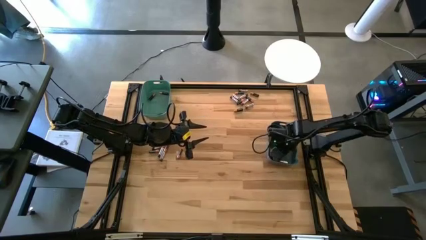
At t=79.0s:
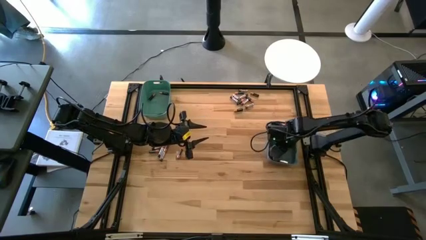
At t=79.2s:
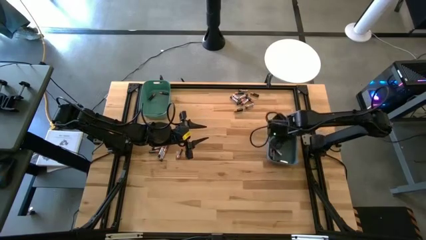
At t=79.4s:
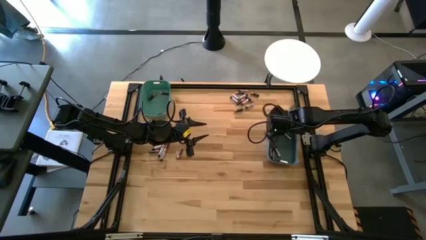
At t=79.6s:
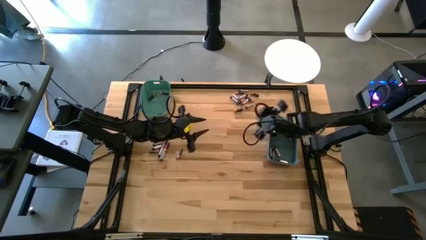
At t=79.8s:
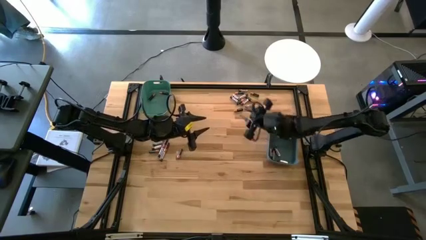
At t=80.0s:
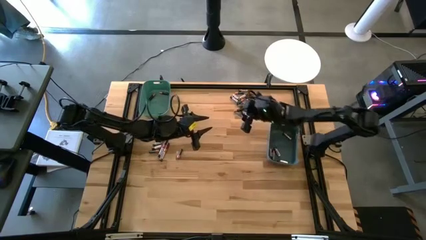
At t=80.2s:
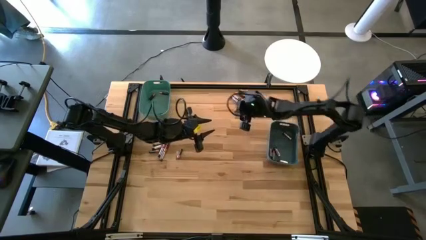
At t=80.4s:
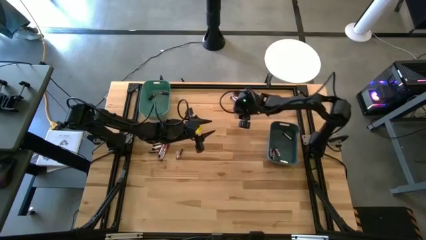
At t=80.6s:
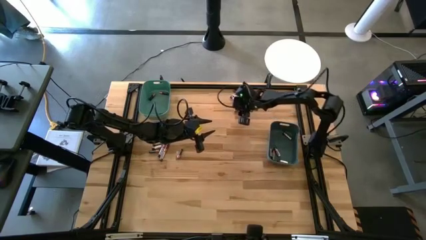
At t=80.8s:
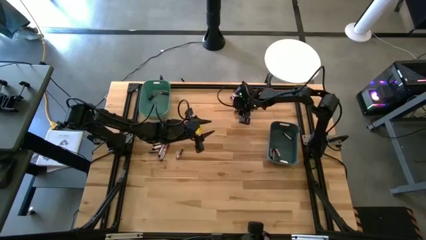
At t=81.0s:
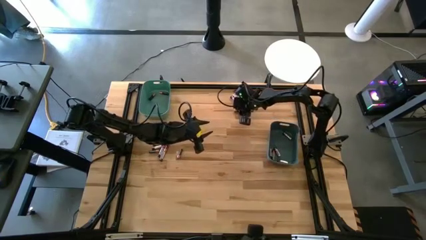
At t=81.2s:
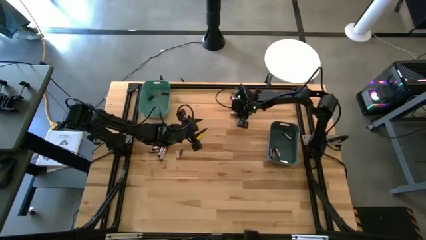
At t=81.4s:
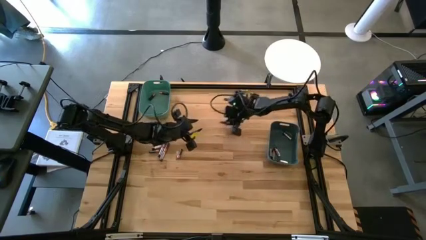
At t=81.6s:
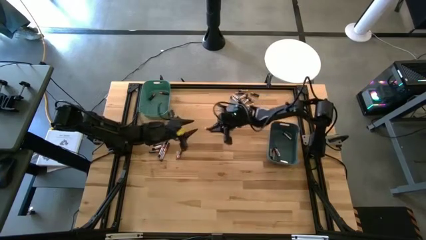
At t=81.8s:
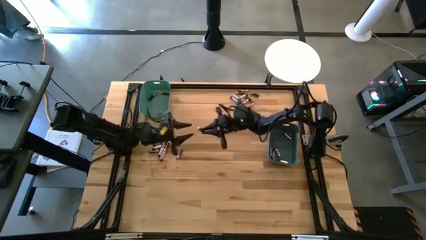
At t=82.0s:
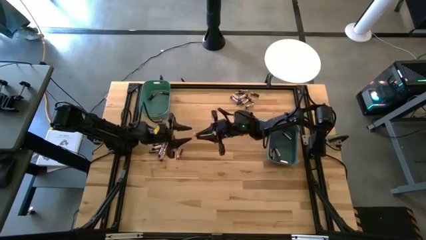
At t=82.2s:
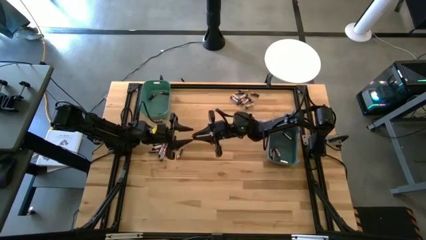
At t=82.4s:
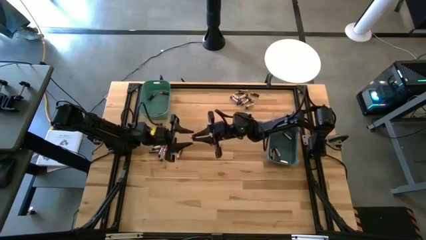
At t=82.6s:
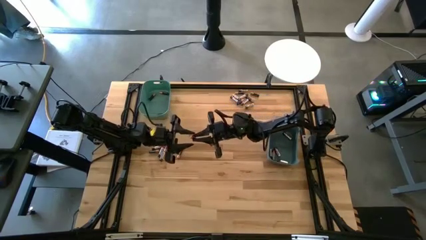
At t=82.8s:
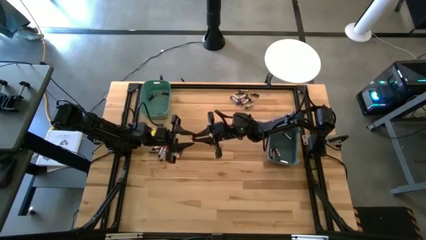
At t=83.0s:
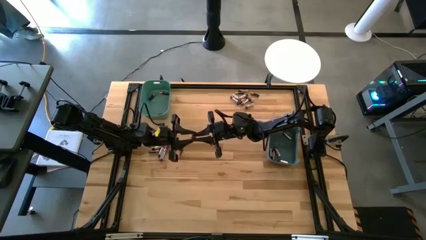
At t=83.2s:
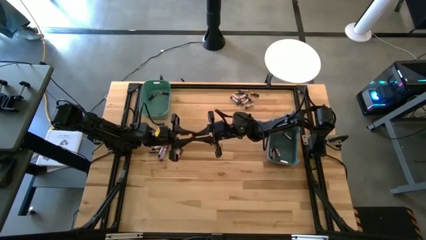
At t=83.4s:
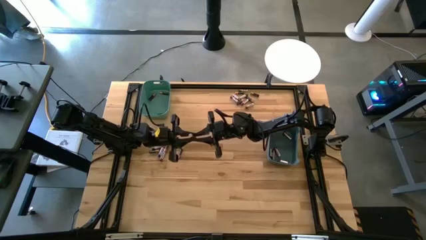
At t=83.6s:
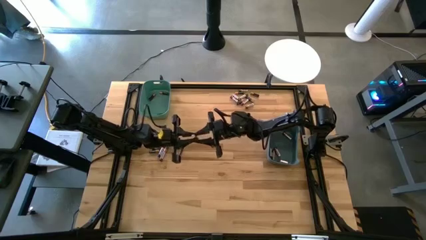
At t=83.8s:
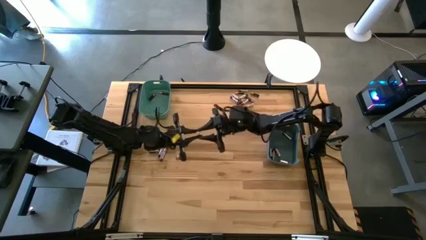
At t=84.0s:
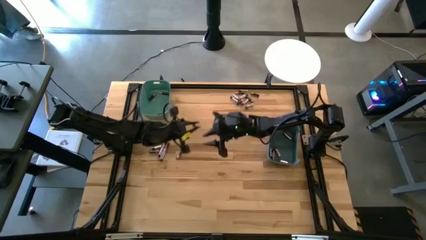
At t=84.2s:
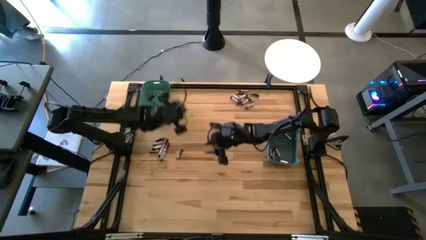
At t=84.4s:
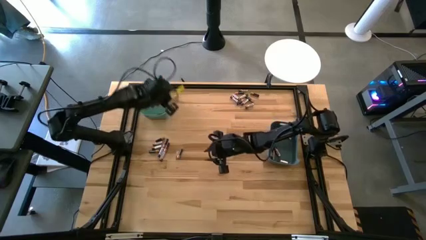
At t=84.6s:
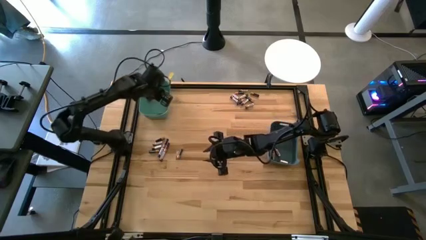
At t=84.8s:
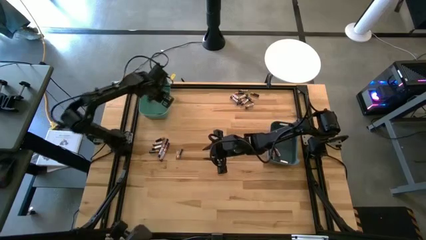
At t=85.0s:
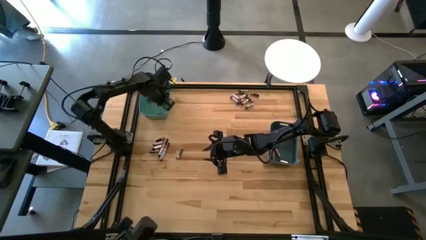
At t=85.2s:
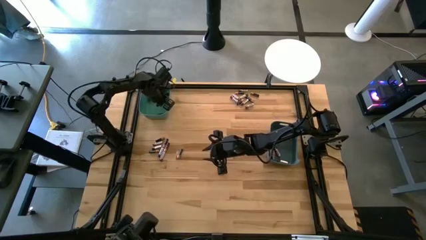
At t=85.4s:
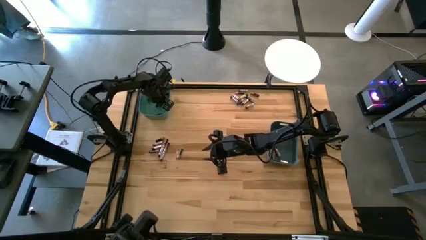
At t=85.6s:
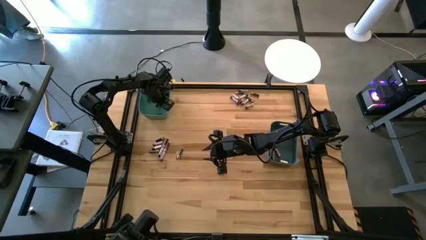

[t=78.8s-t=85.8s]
Task: Sort batteries
Put the black battery into the green bin

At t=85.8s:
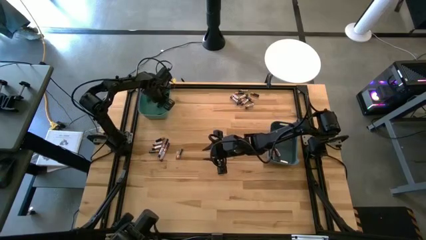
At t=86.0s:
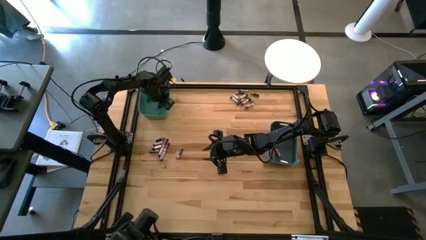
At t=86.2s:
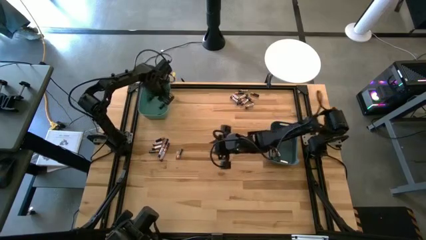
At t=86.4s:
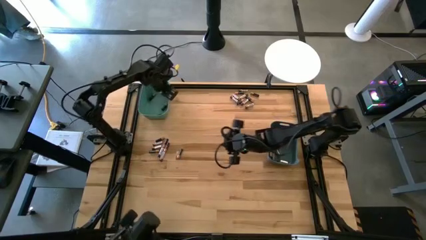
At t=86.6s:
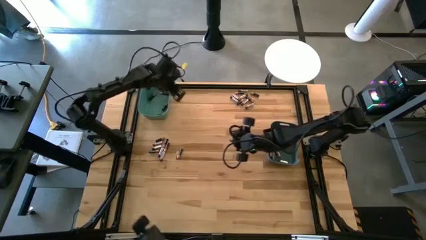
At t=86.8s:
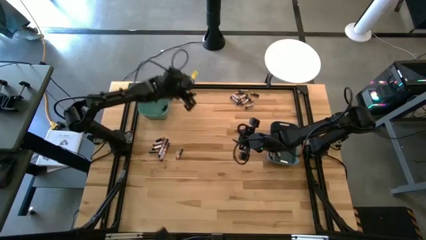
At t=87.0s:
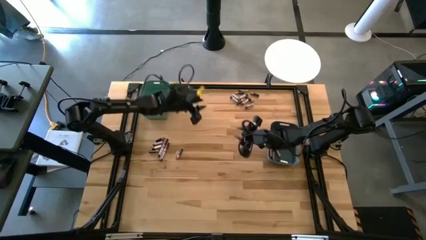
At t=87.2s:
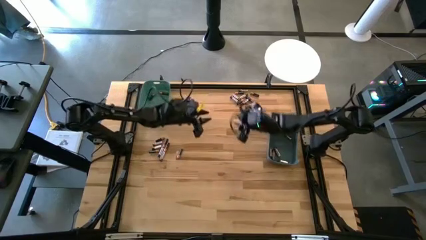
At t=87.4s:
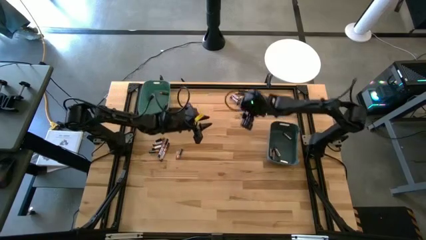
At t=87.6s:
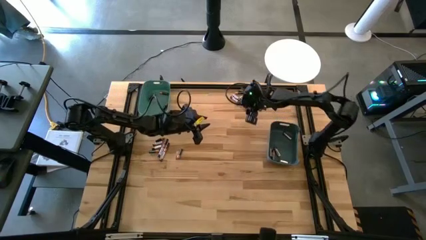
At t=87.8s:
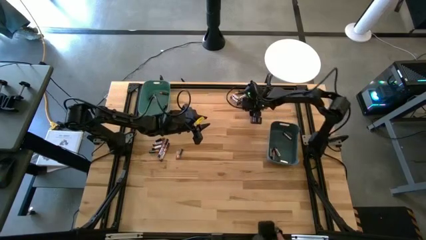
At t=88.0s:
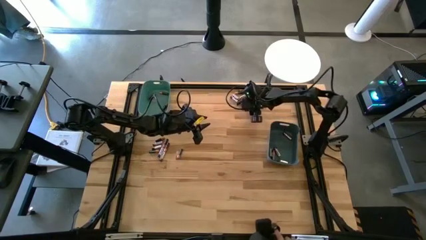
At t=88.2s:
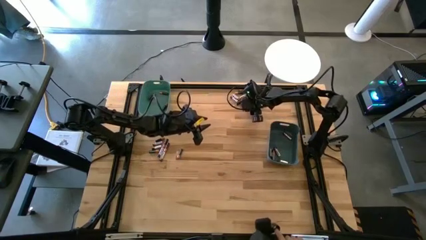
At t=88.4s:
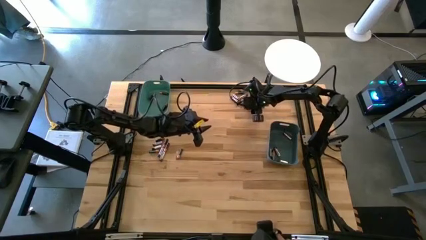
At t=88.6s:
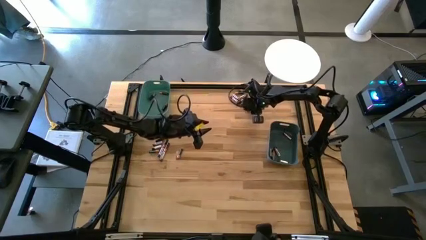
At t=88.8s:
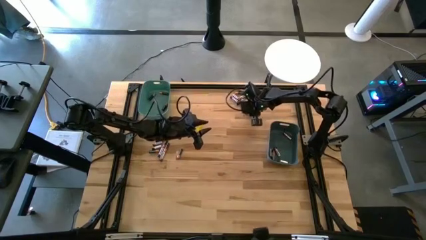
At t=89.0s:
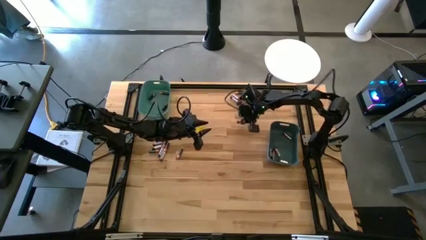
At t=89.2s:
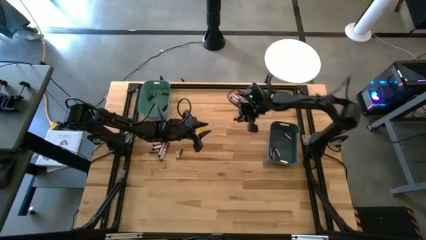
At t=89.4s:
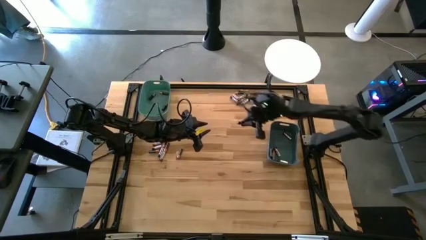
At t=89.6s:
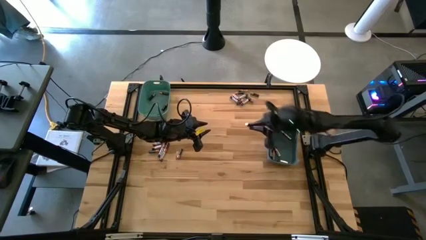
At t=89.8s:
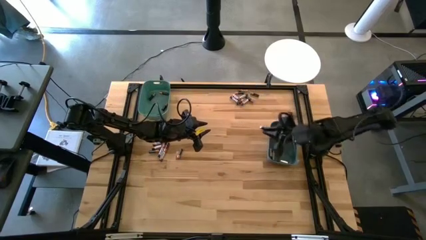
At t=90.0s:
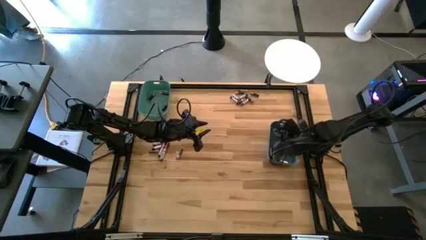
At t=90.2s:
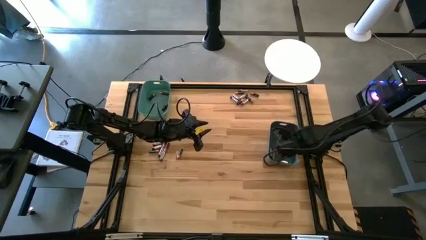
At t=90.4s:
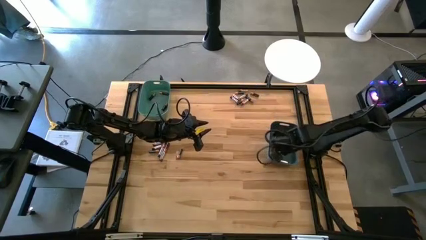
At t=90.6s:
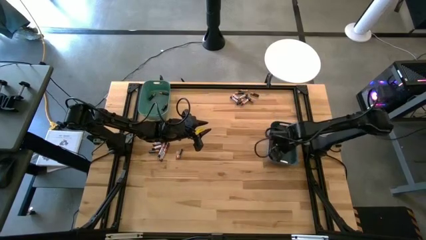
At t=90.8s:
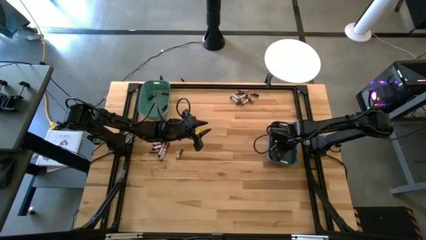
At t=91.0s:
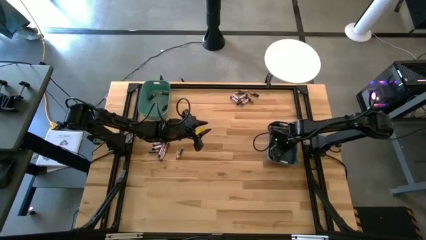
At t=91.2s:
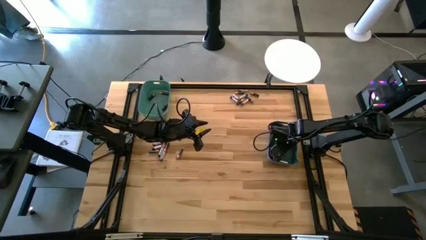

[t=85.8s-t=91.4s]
Put the silver battery into the blue bin

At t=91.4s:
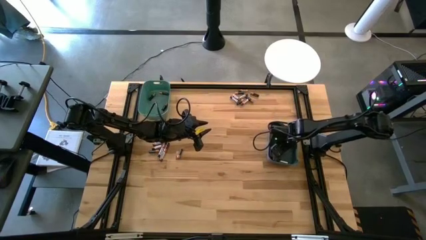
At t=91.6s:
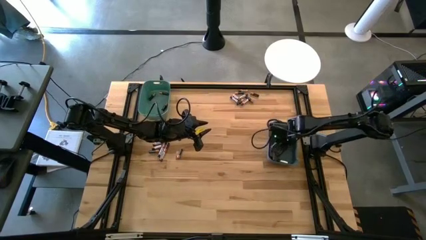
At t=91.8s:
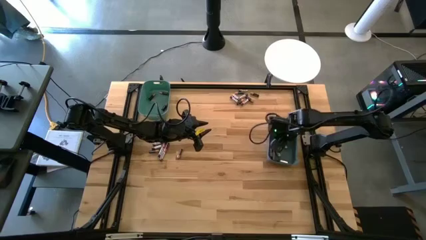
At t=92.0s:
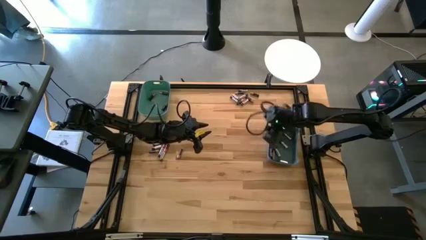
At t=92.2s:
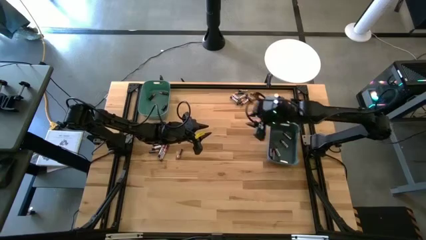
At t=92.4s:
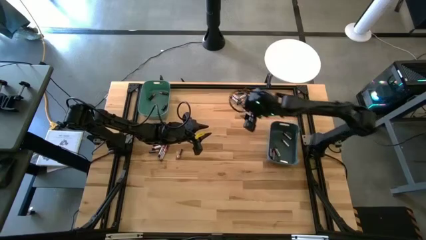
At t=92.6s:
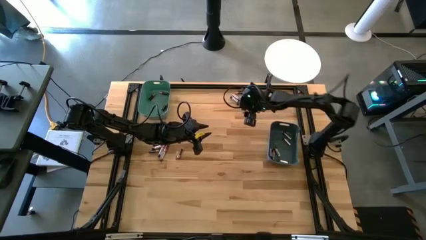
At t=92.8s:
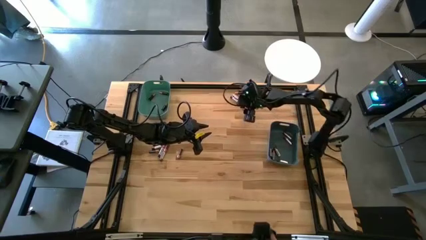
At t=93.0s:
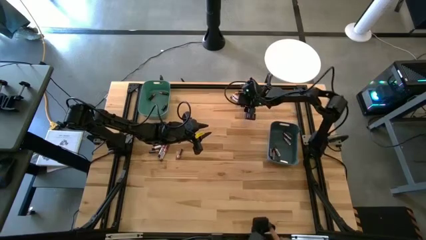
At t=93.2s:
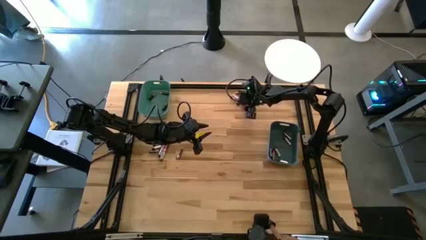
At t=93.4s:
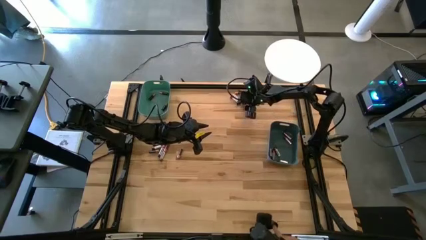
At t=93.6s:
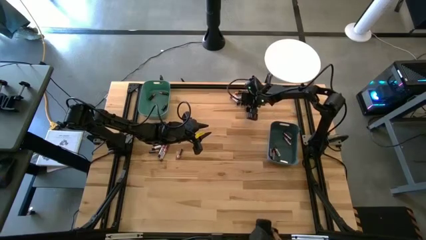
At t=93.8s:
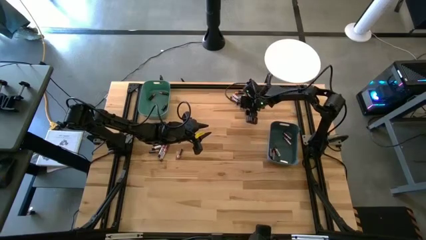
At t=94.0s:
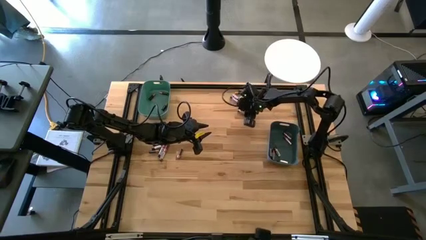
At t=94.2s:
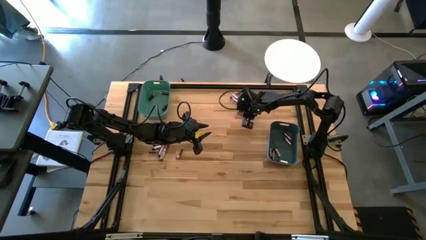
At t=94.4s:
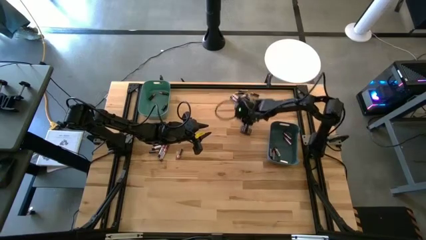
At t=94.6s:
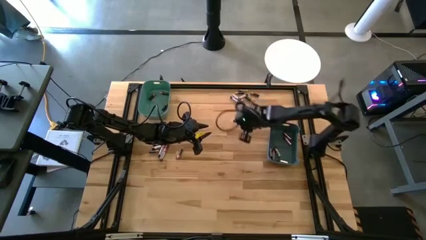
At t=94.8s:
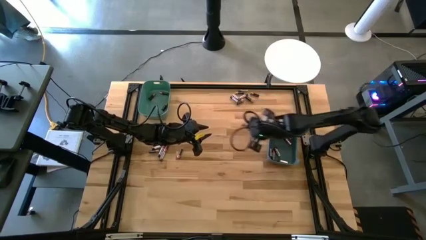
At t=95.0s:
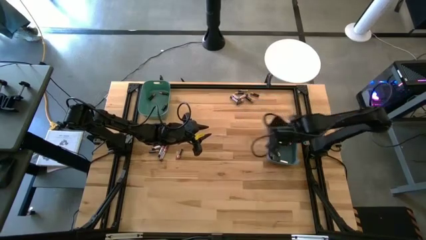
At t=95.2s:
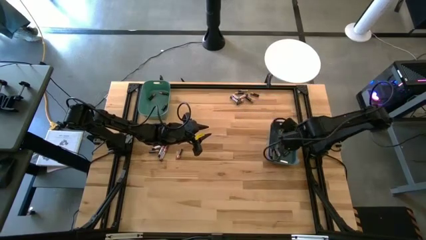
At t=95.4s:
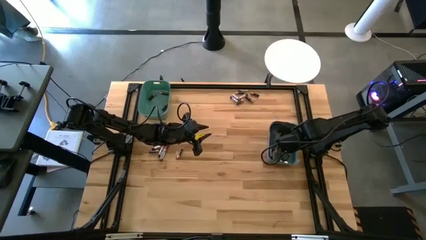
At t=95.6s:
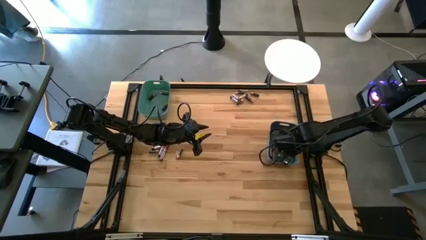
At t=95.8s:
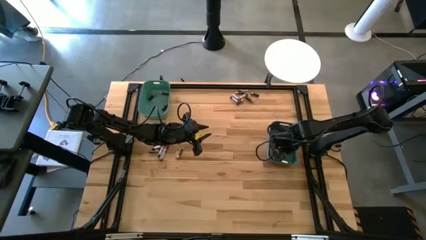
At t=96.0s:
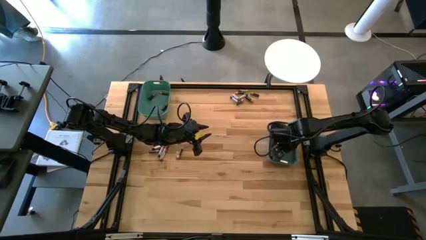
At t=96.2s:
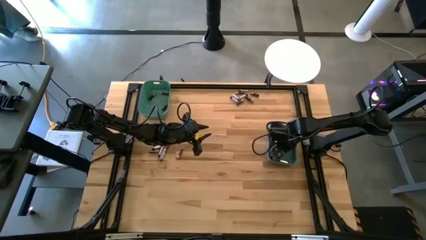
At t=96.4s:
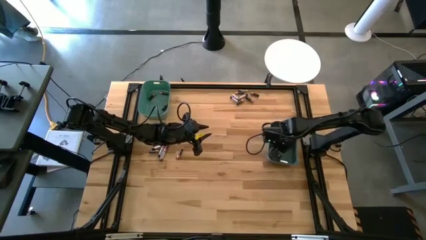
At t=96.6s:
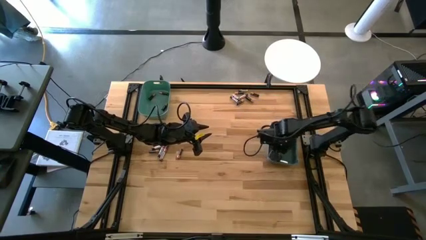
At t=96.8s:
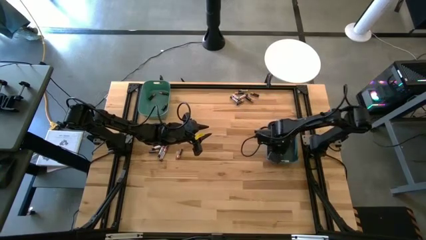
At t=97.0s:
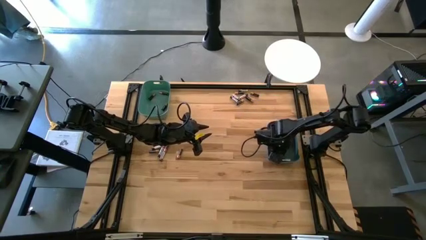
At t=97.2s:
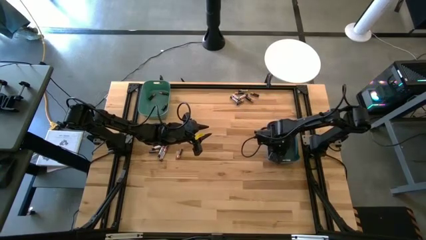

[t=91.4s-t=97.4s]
Put the silver battery into the blue bin
